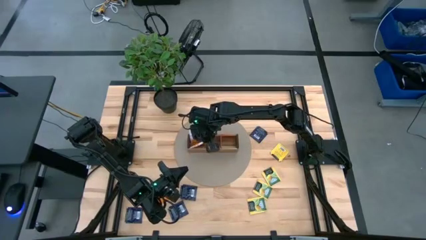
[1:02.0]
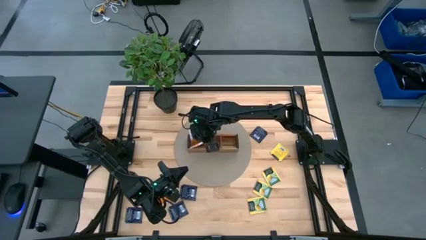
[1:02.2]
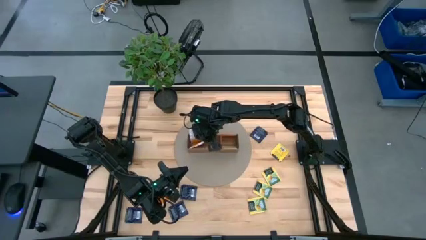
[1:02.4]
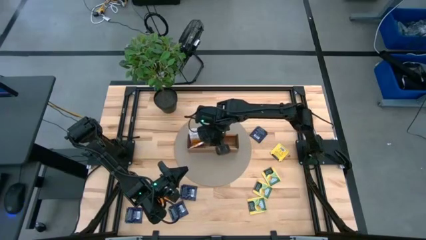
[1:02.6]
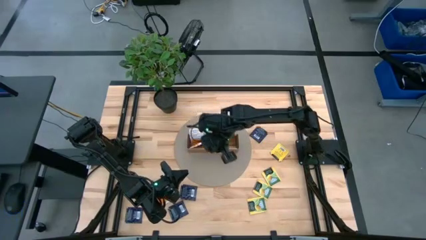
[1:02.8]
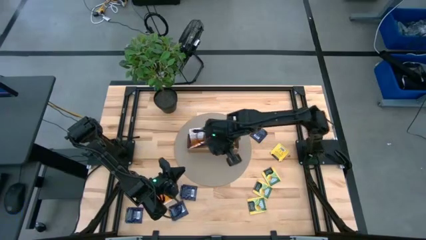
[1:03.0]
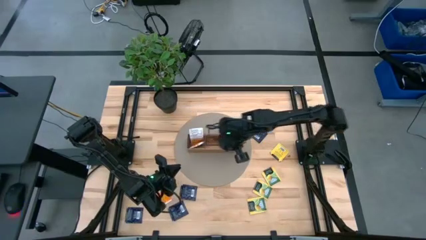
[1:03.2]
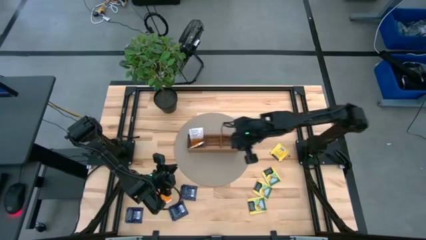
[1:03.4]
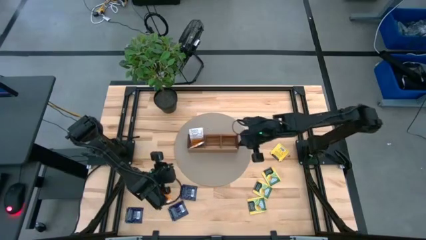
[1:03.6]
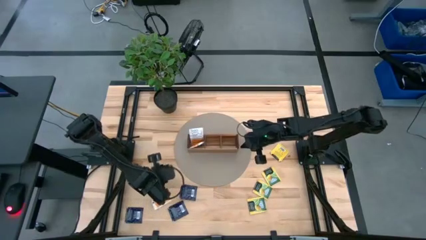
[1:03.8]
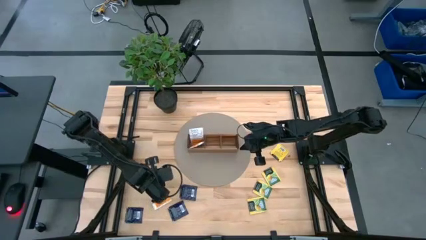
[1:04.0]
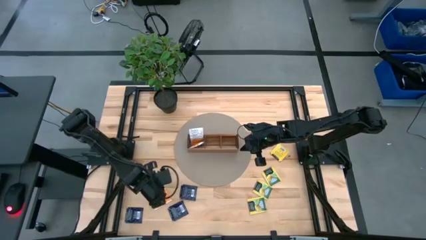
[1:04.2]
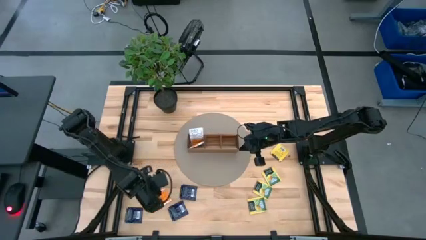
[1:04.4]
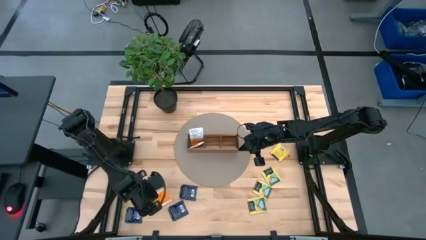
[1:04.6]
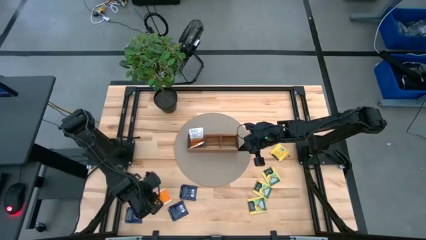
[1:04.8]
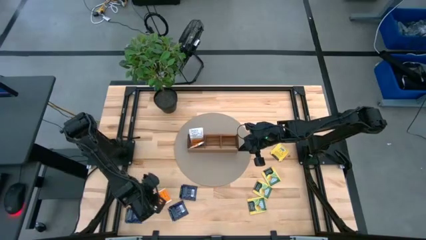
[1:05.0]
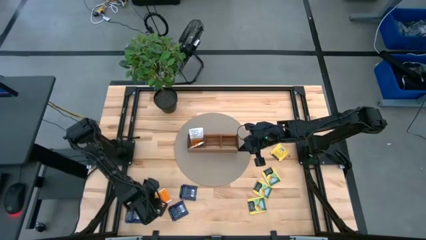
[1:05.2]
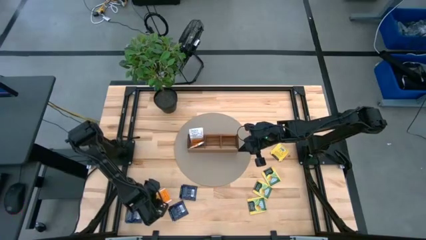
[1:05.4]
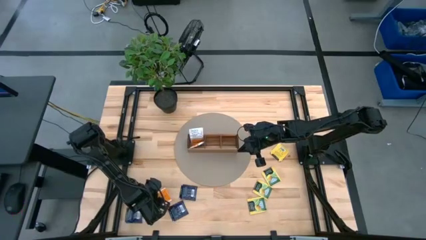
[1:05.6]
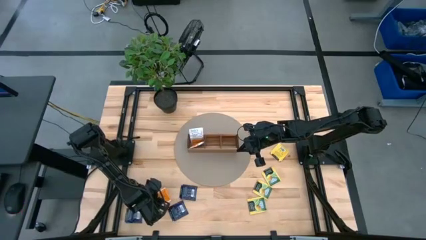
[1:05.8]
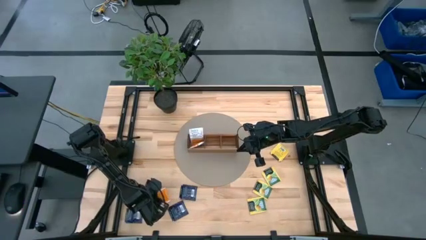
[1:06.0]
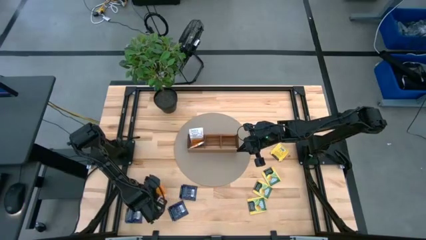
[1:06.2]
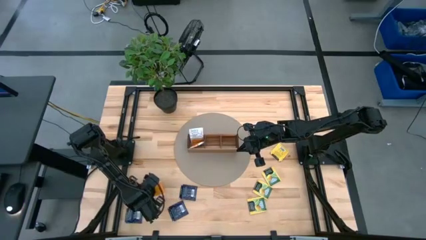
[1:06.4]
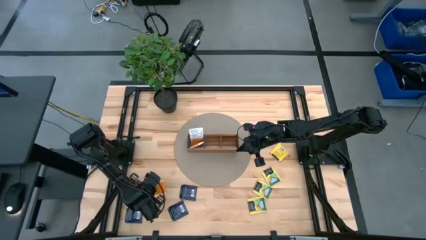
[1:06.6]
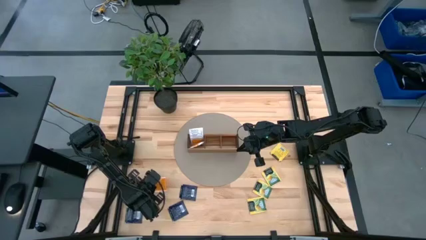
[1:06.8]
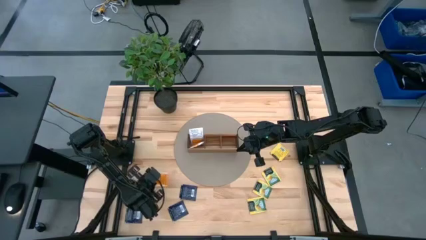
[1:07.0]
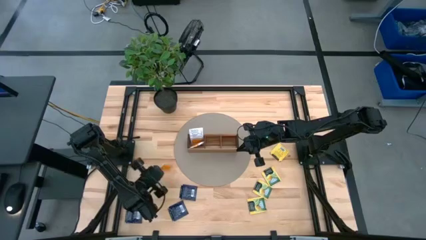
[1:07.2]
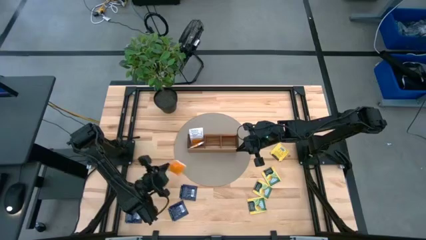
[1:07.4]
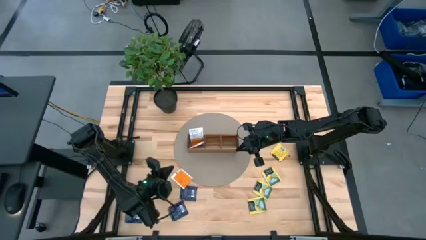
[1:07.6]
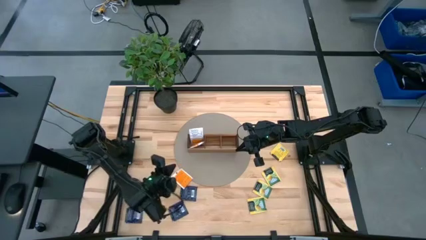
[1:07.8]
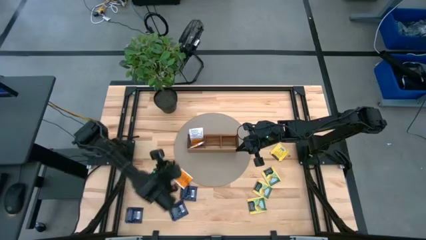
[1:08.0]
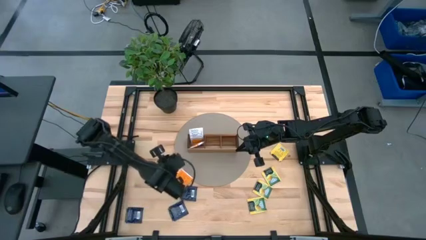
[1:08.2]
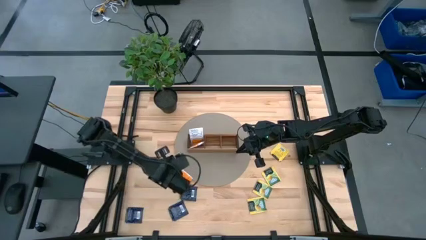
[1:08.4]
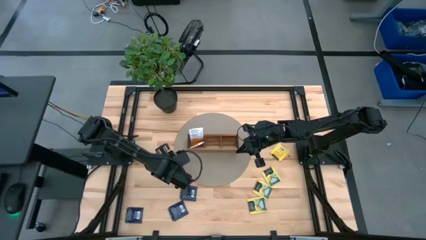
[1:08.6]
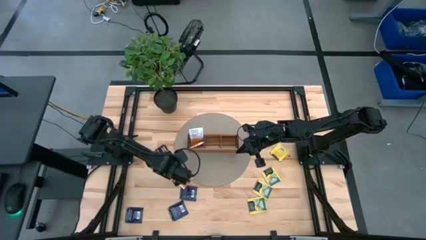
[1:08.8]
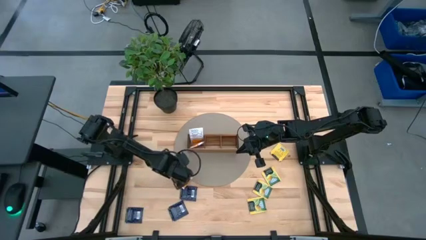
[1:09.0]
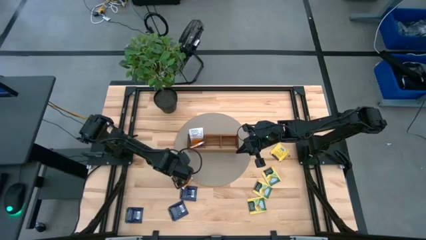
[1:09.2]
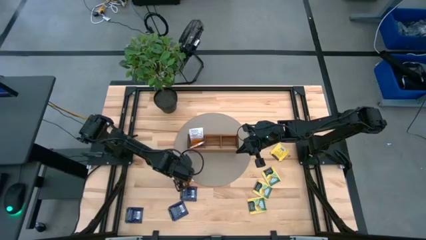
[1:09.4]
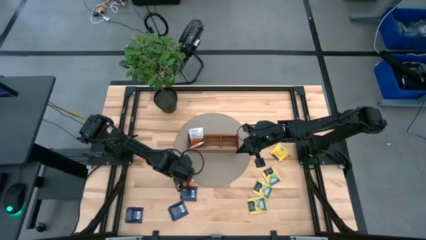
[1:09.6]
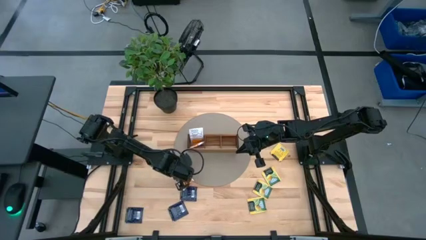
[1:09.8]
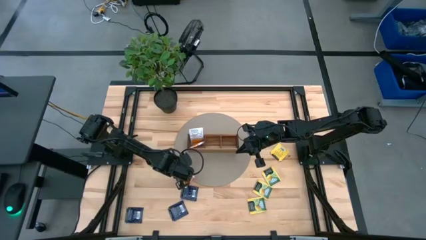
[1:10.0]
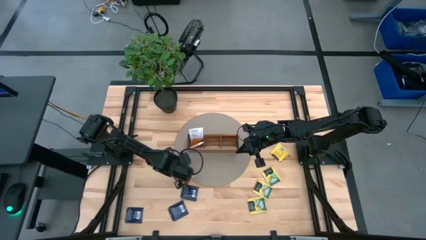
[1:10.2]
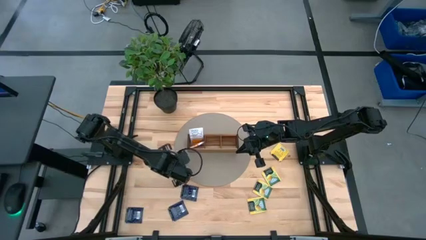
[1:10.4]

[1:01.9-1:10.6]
Task: Pick & Place Tea
Put the orange tea bag into the left section of the wooden organizer

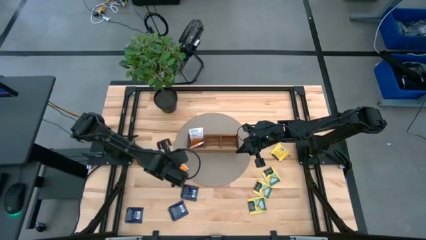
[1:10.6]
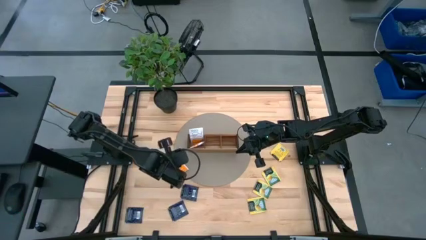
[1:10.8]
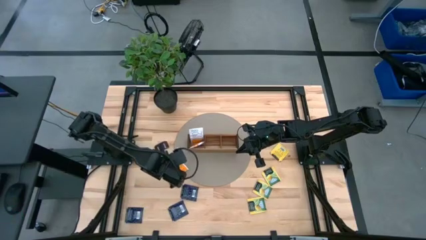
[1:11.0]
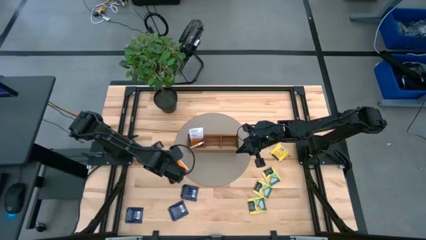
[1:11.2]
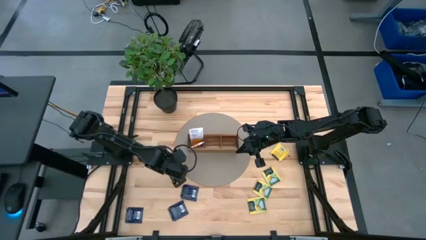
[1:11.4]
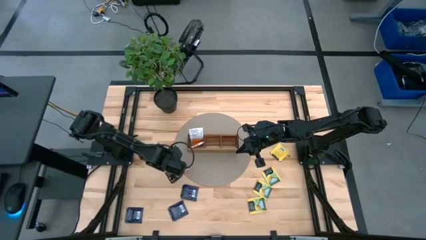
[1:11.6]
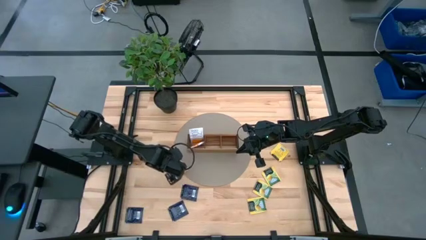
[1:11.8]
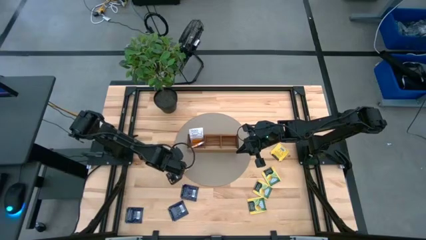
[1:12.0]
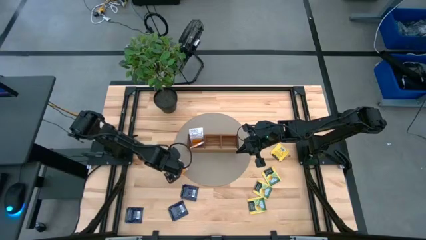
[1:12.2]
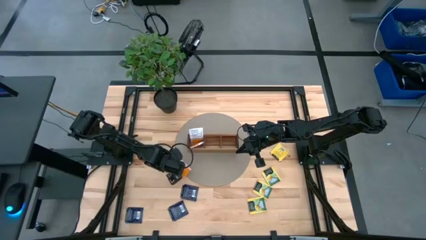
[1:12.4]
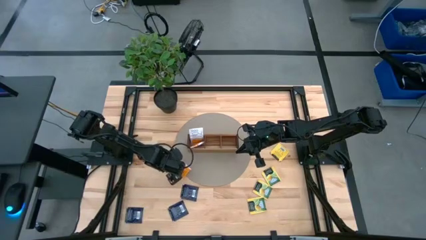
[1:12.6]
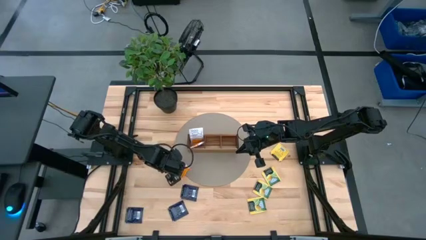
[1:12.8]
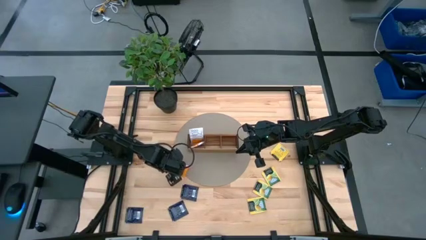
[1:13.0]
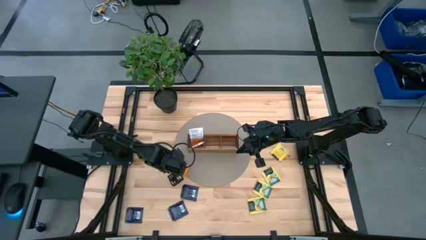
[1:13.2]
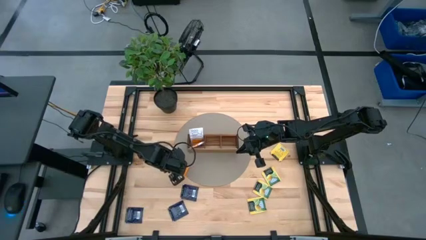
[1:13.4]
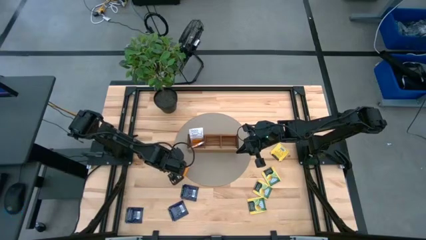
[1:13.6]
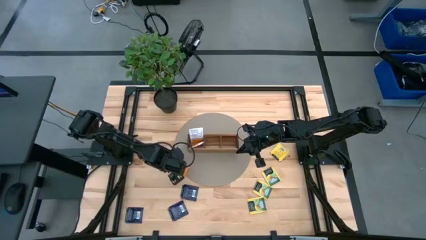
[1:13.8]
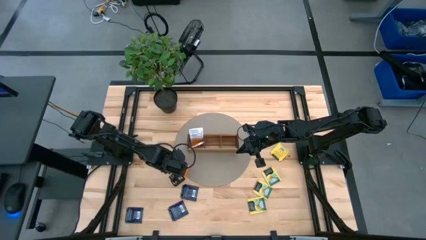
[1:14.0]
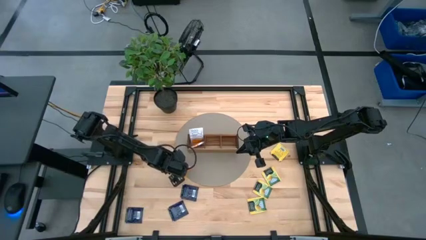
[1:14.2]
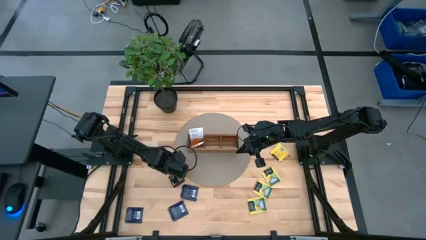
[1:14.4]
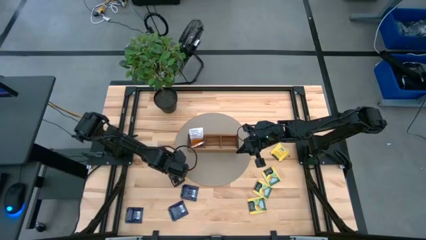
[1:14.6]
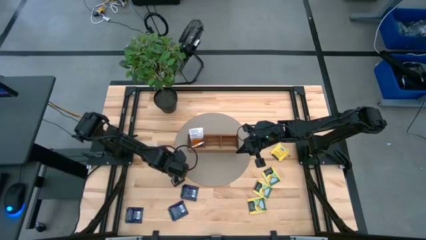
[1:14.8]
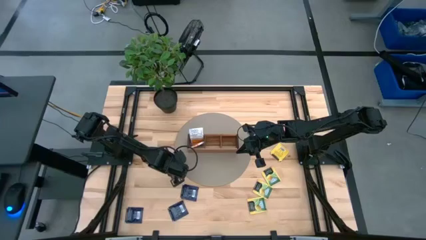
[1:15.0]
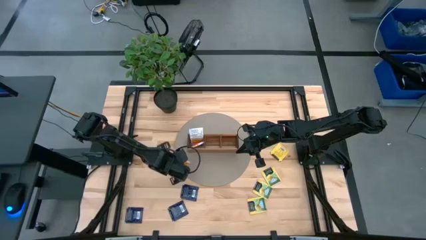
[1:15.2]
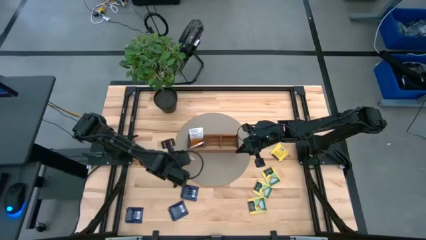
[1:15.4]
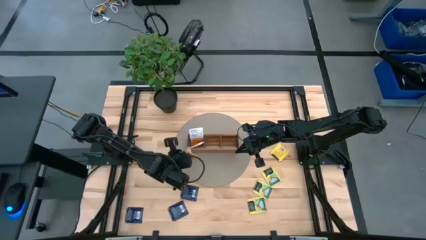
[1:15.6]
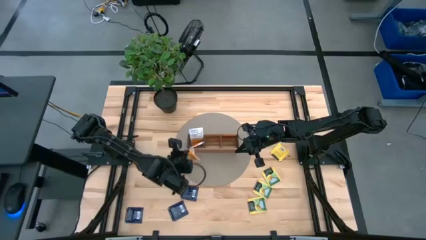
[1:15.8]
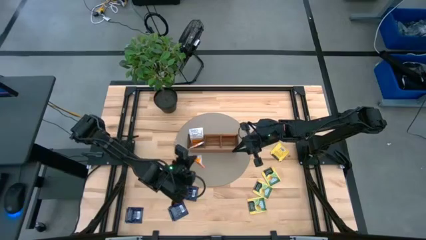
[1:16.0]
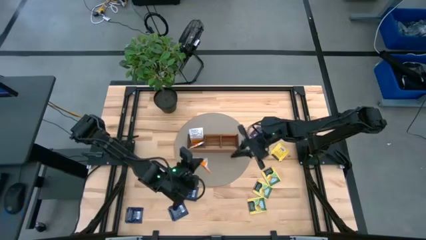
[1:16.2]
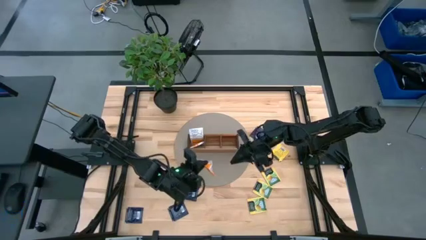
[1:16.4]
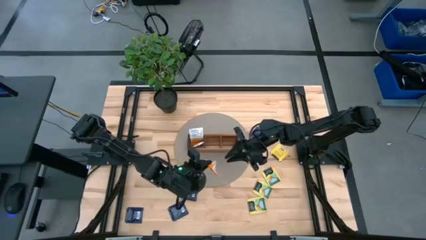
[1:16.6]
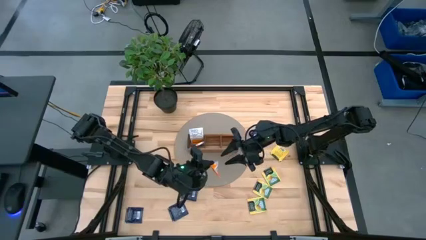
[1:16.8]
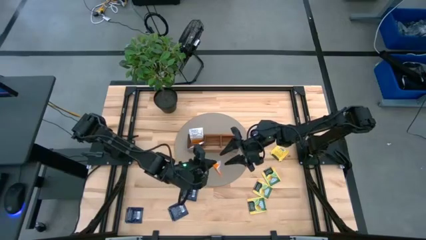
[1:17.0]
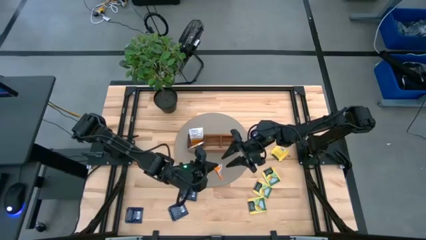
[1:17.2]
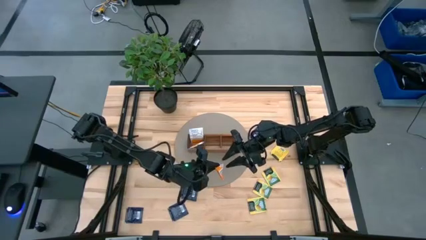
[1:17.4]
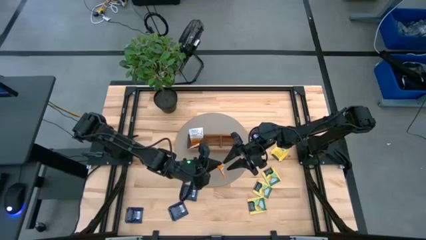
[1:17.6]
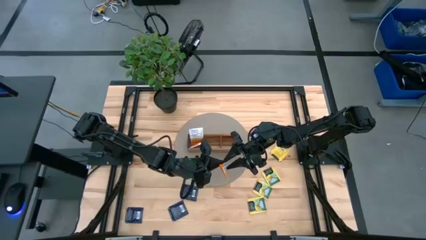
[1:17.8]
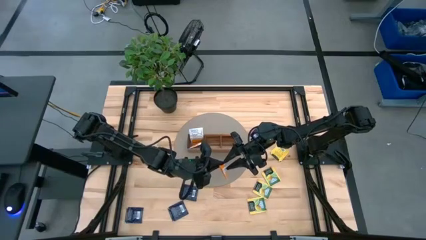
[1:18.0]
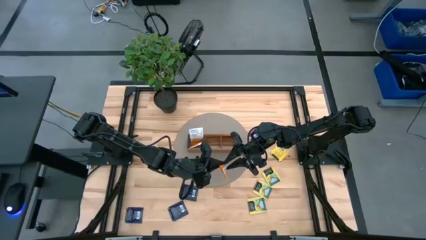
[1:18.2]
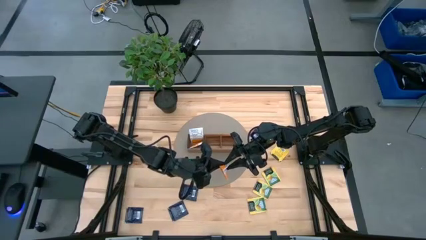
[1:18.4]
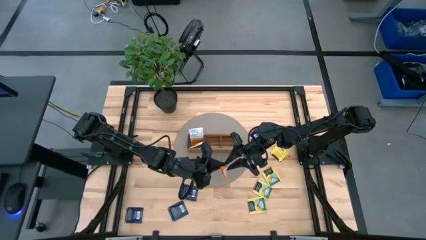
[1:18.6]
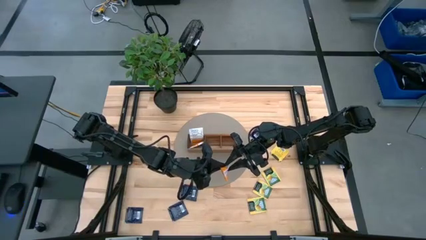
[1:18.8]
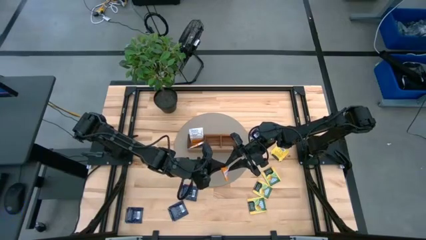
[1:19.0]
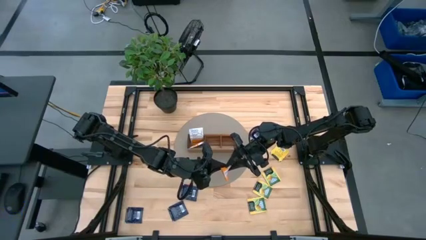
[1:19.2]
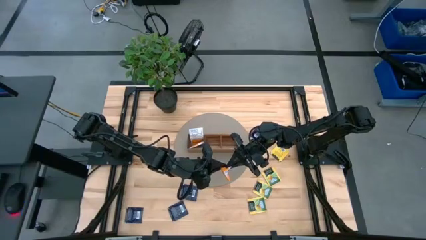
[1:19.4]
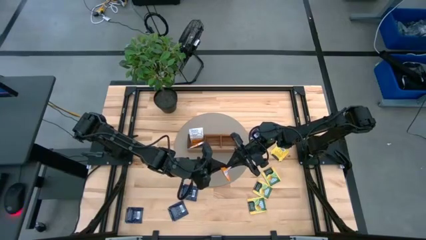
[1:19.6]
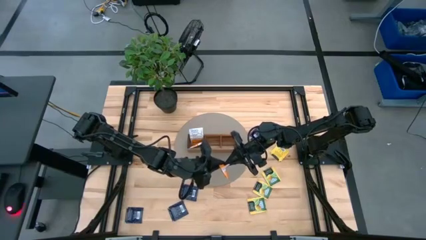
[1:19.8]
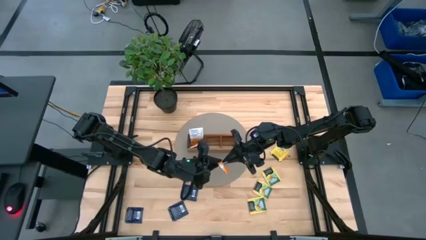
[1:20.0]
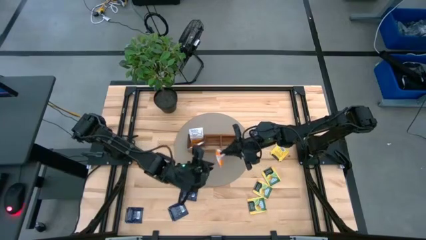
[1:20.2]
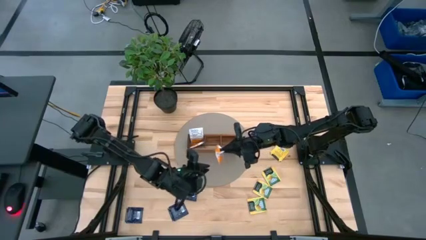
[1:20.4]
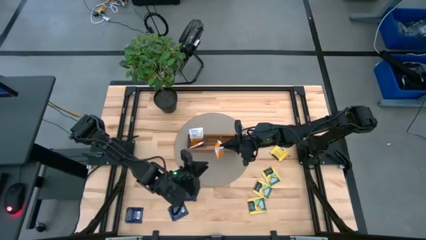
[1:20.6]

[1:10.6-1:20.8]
Put the orange tea bag into the left section of the wooden organizer
